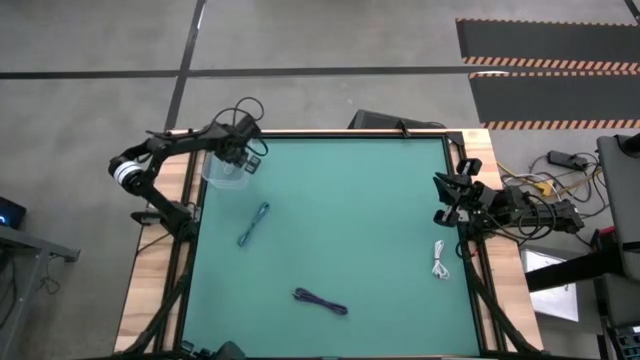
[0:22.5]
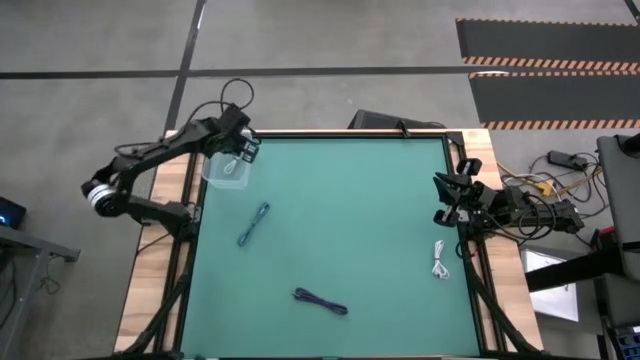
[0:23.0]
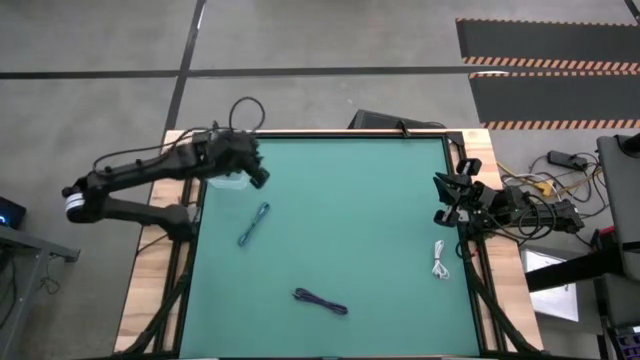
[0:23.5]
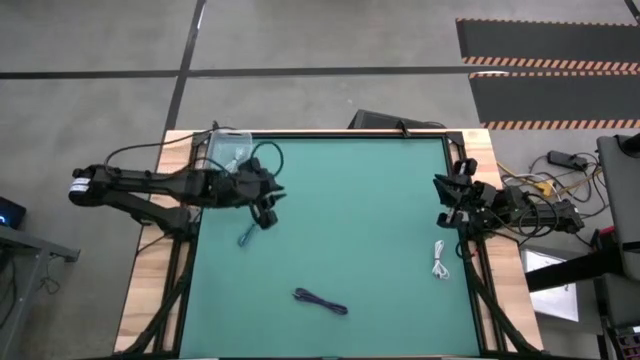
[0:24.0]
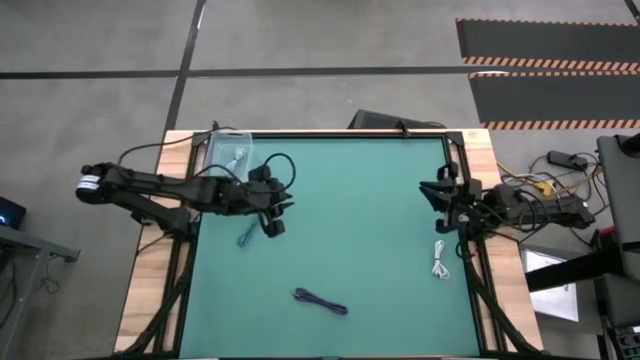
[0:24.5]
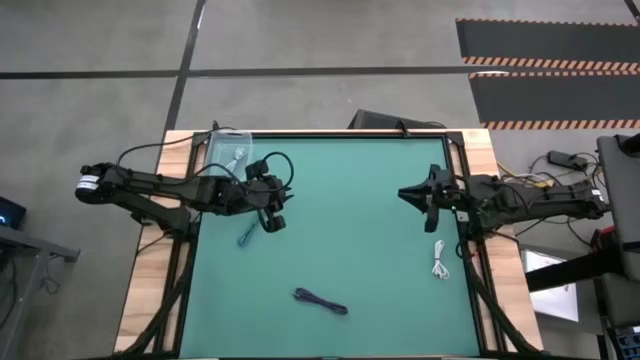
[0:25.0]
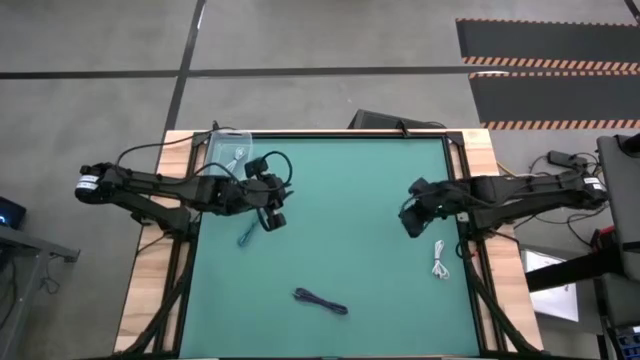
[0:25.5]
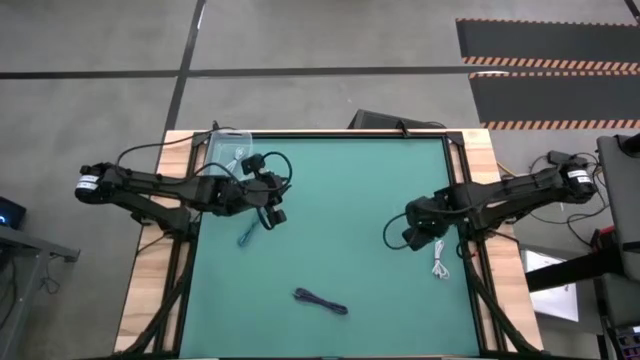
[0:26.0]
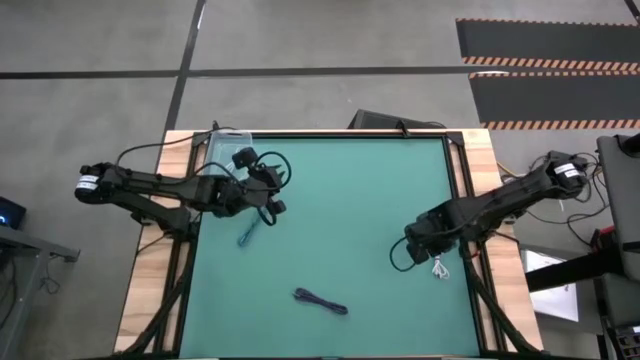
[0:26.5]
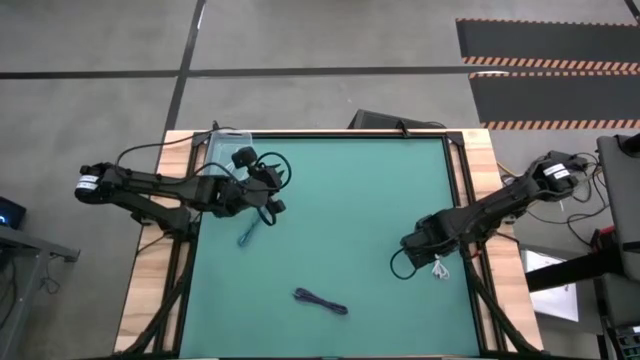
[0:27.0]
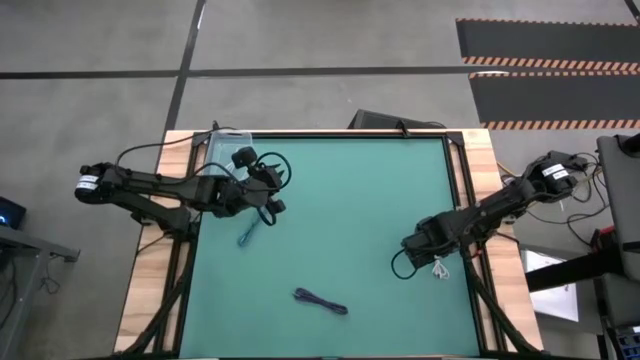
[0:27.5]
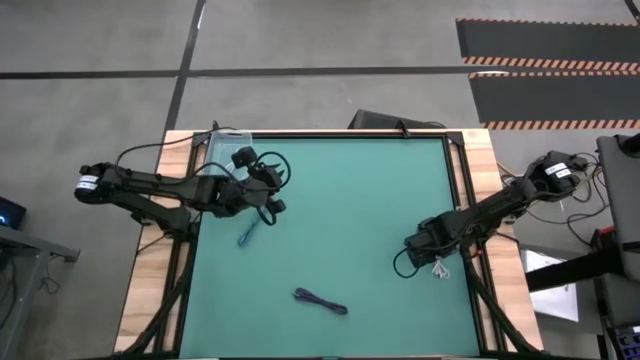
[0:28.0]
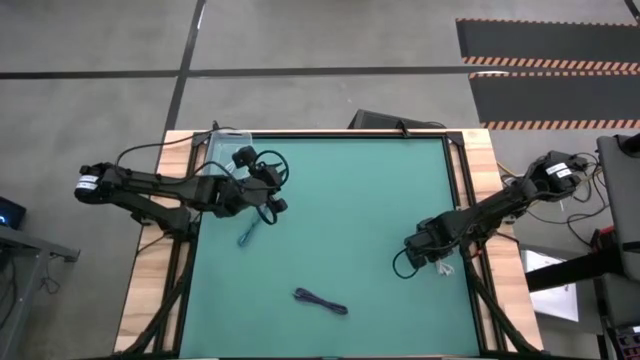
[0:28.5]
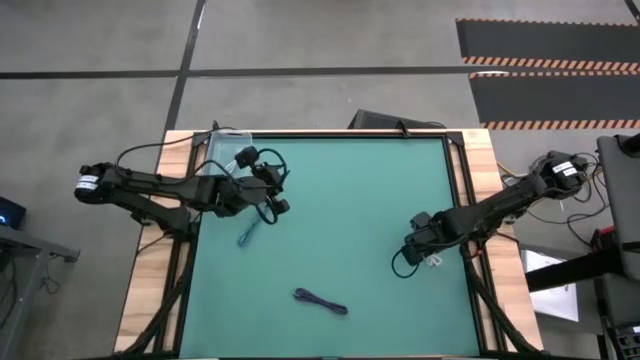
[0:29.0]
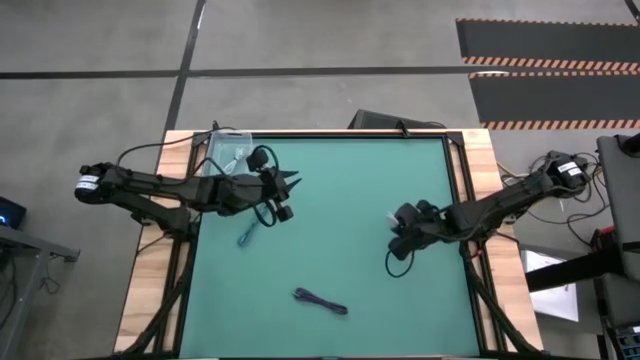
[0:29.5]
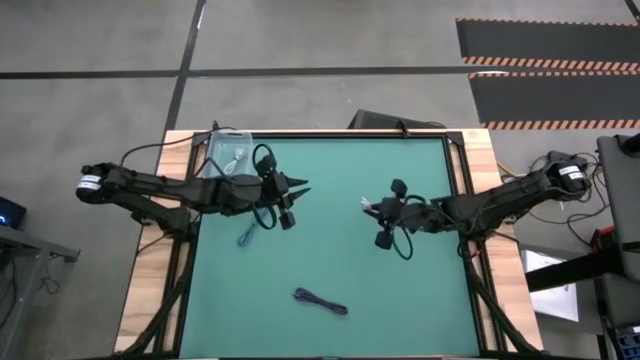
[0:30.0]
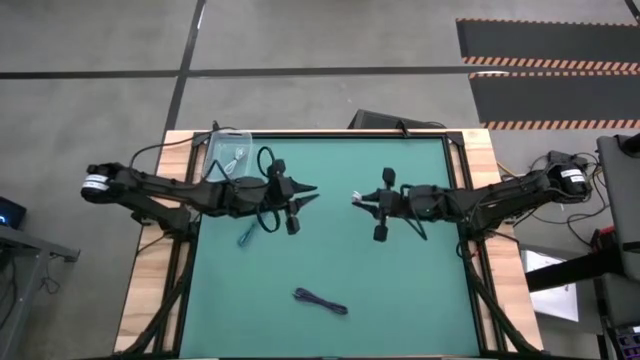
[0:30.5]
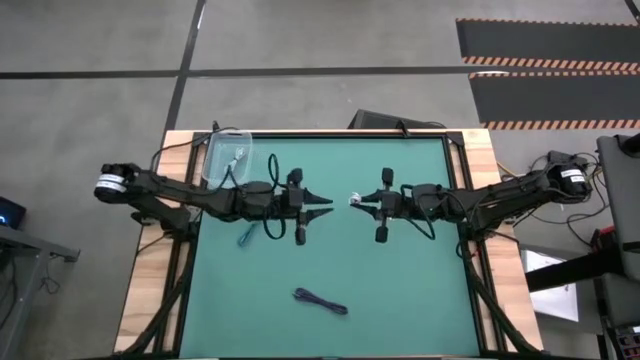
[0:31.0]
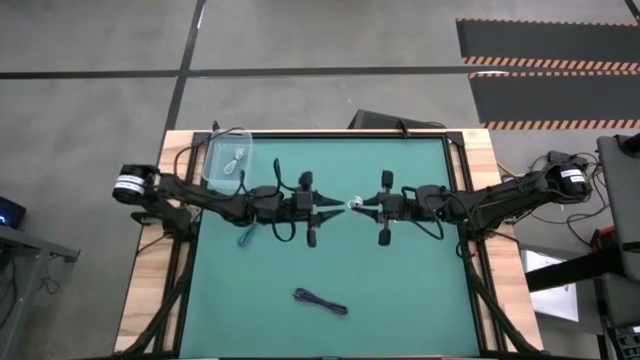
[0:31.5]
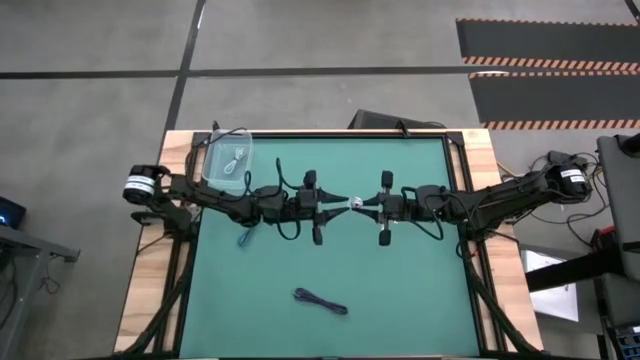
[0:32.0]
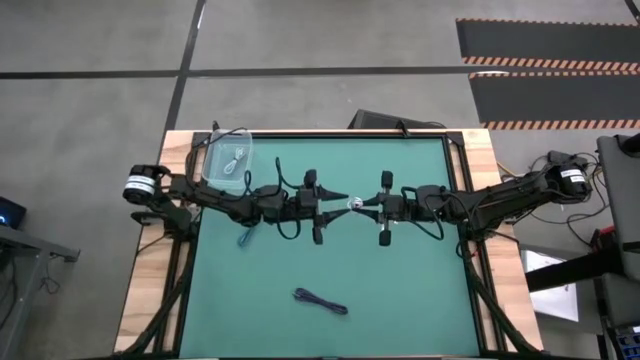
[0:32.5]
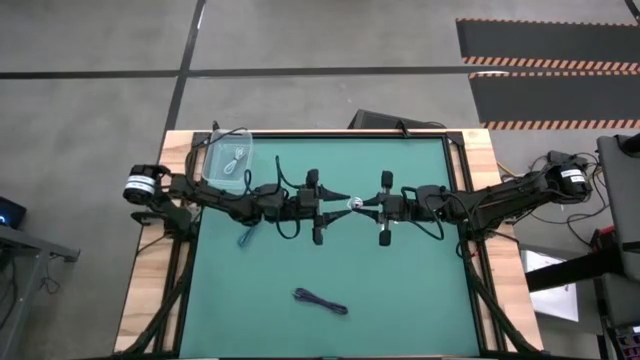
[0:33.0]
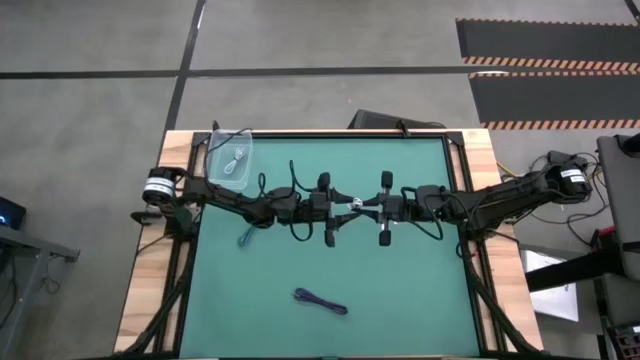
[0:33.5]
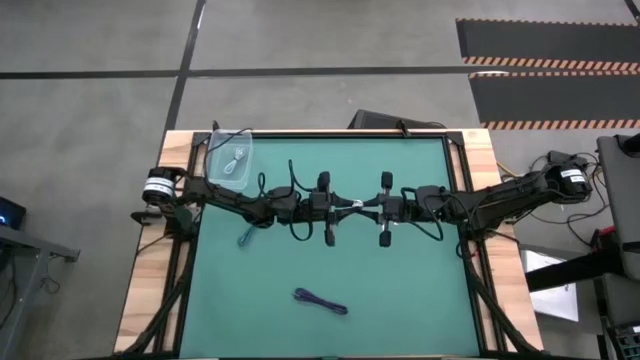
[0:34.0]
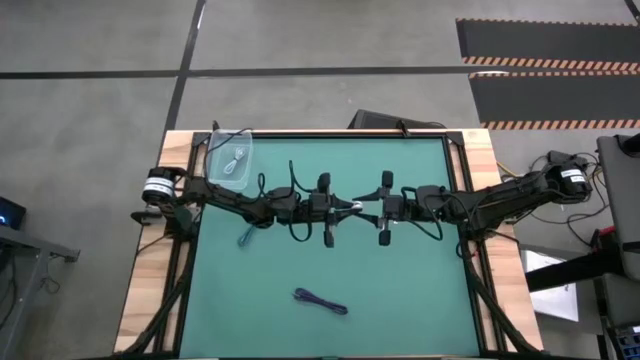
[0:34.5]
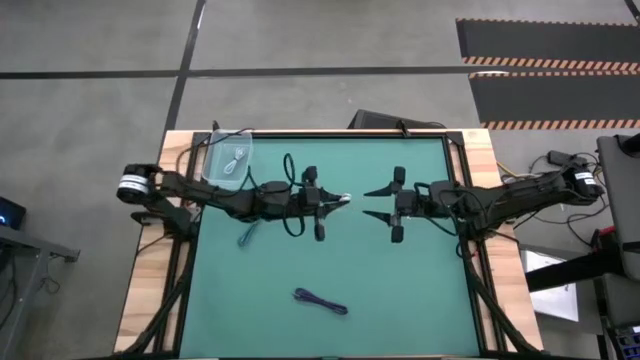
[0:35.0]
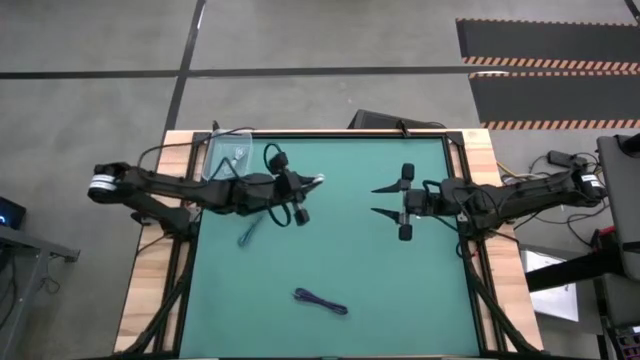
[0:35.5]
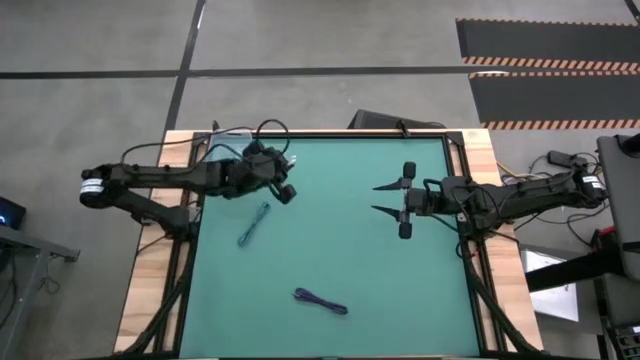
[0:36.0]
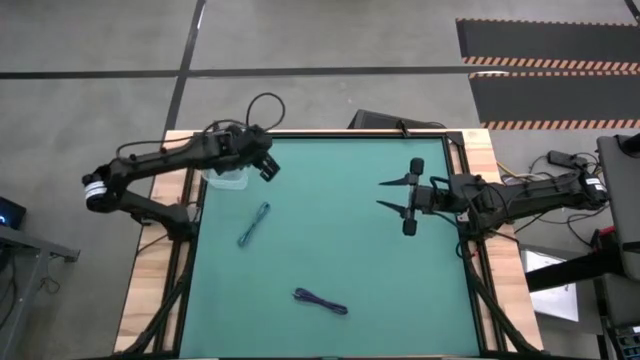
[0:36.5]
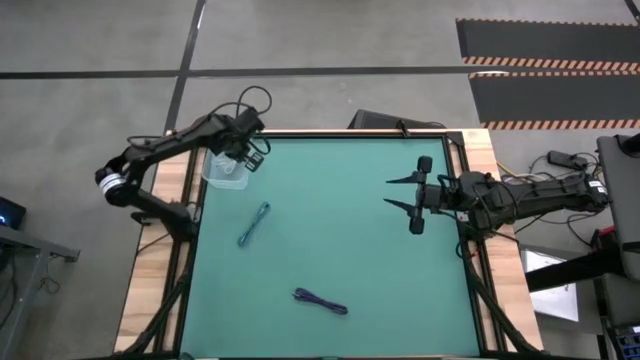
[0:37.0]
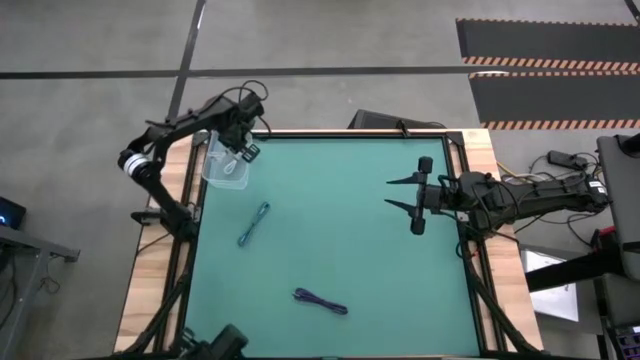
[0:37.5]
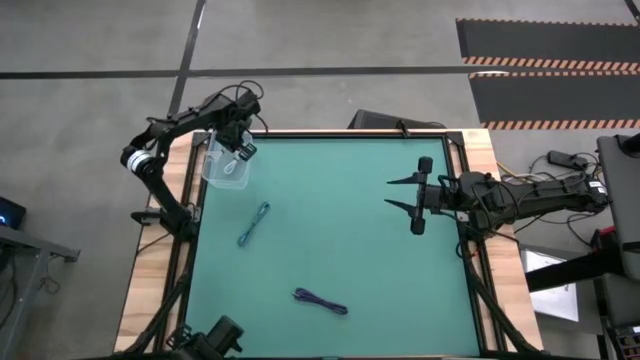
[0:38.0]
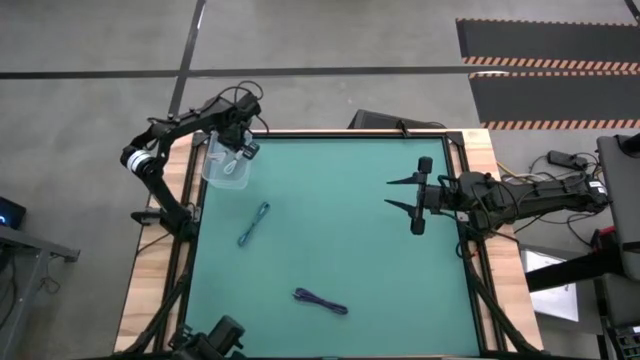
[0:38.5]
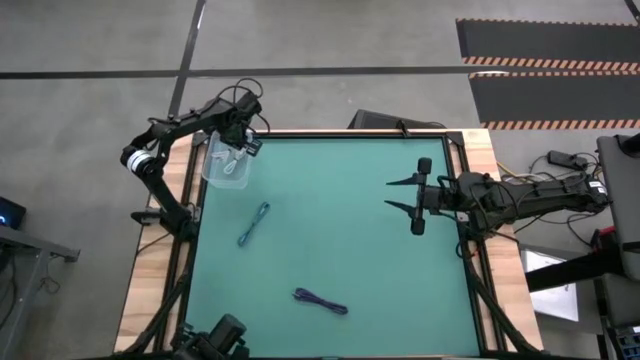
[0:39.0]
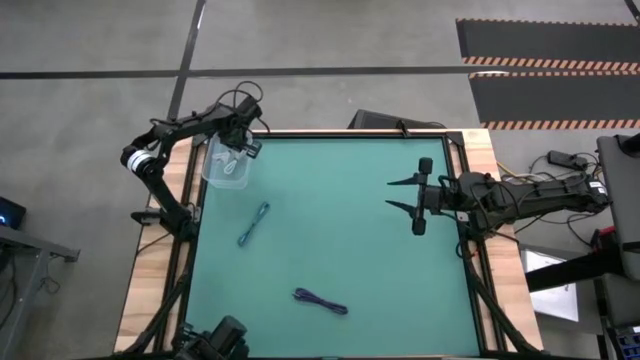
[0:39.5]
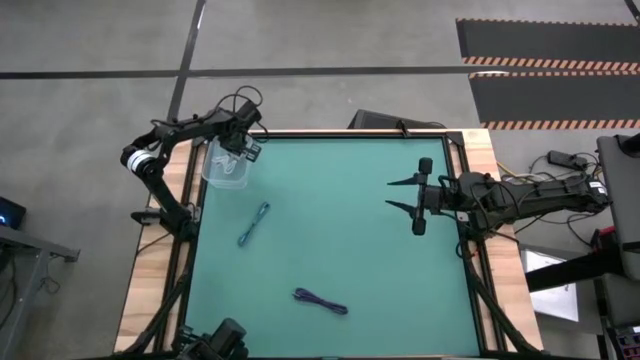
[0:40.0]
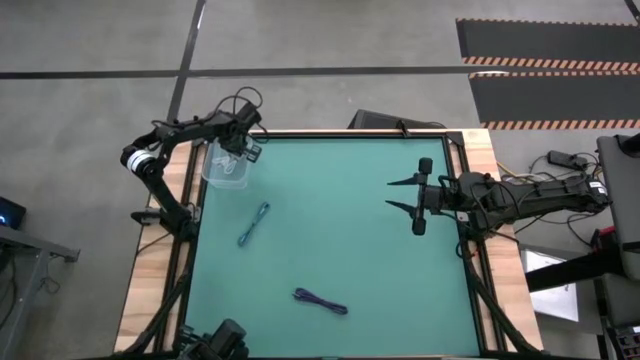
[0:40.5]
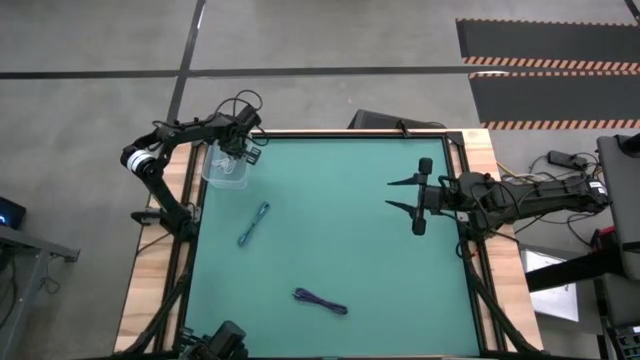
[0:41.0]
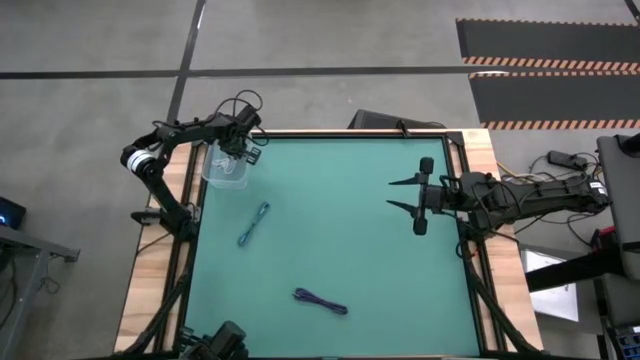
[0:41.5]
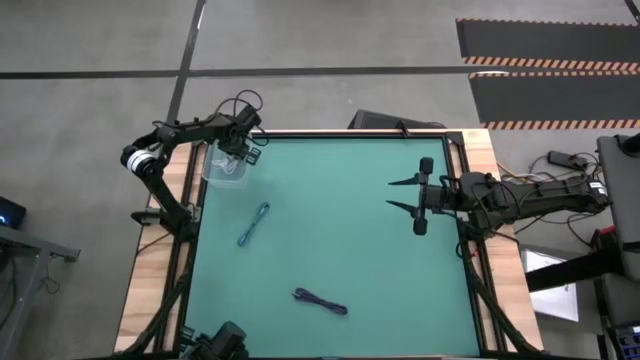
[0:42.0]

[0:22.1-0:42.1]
Task: Pick and place USB-C Cables
Put the white charger cable into the transparent bin

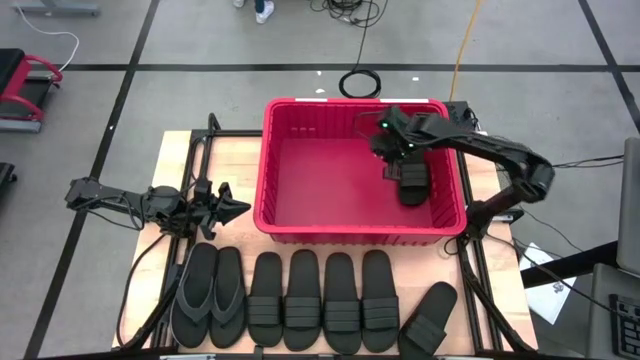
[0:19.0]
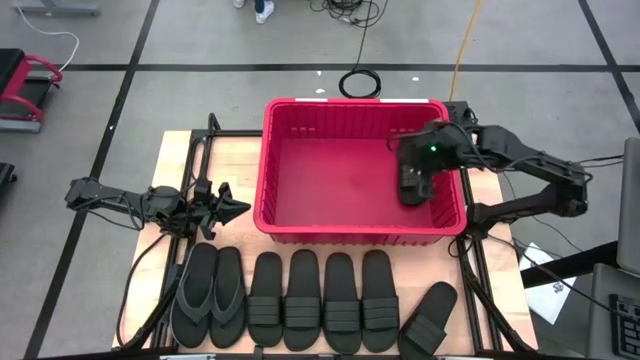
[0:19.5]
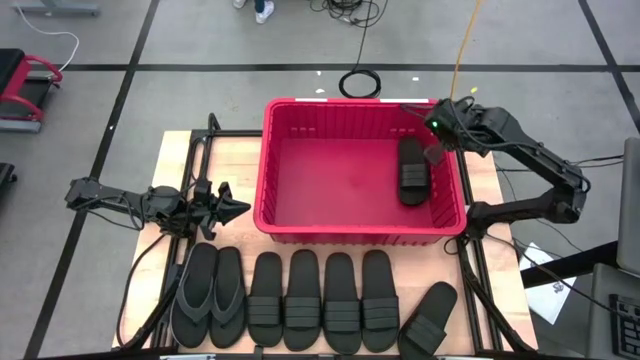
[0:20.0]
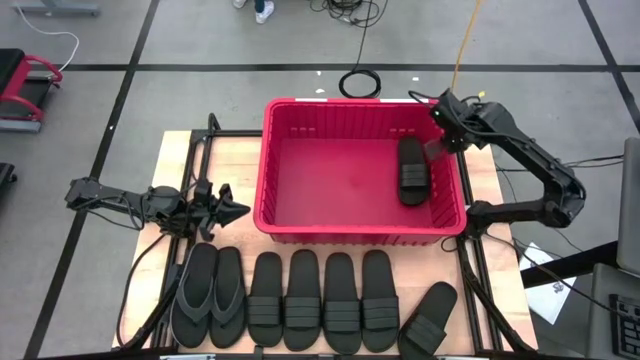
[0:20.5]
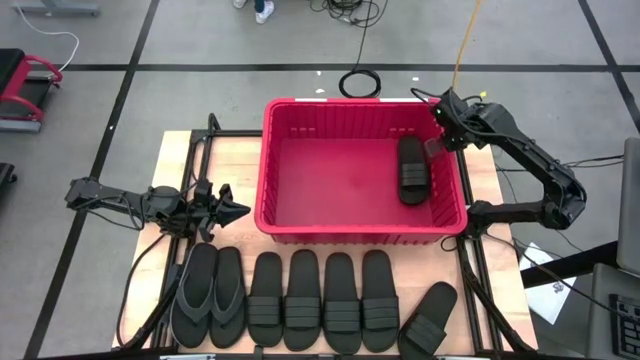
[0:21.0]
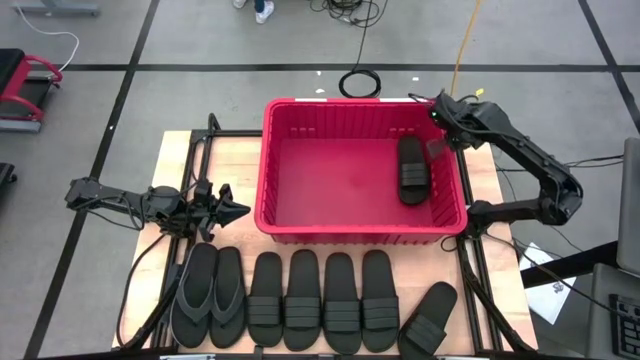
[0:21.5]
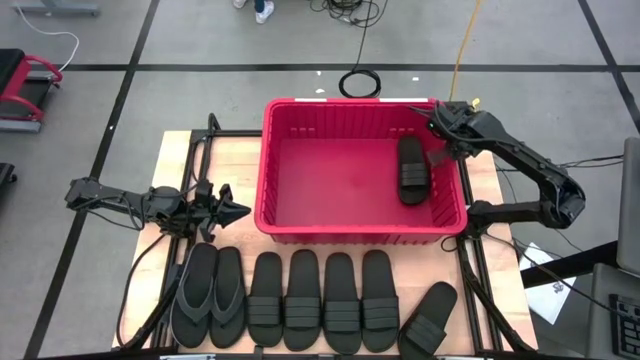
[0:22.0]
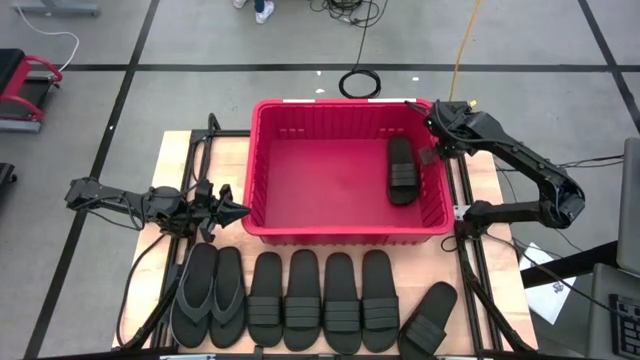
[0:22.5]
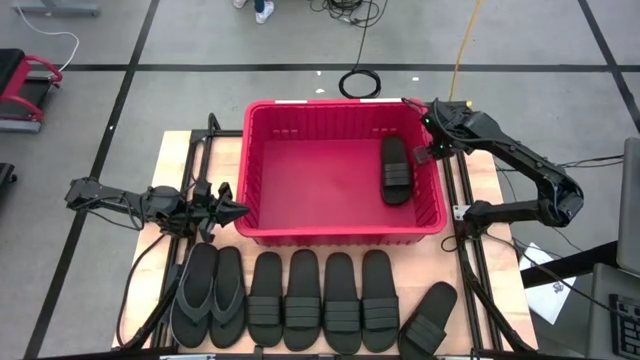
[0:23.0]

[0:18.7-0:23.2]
Task: Pick and place slides into bin
Adjust the red bin
